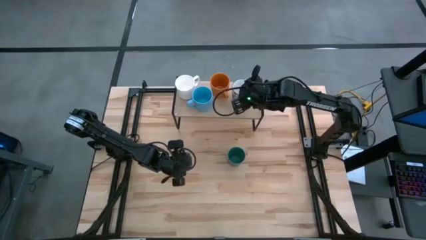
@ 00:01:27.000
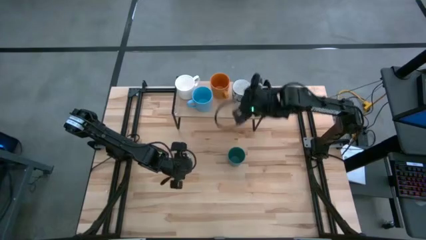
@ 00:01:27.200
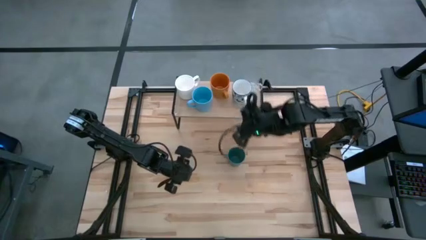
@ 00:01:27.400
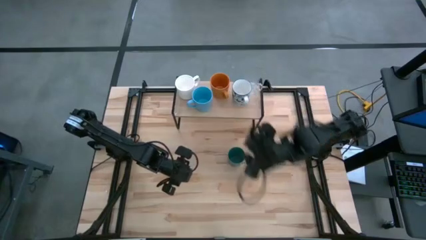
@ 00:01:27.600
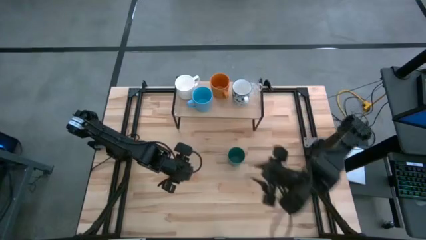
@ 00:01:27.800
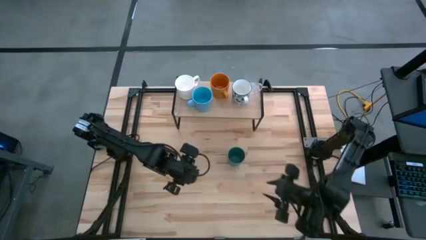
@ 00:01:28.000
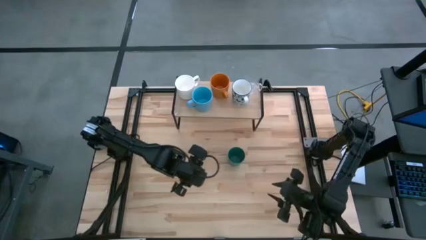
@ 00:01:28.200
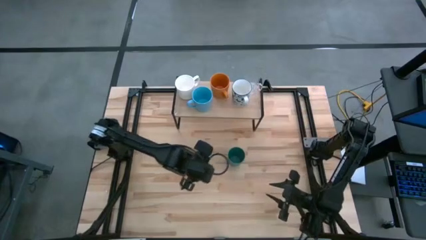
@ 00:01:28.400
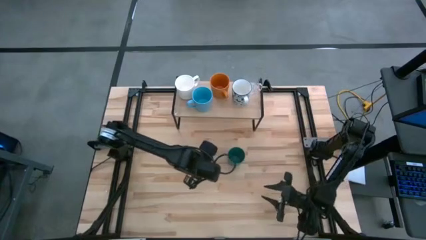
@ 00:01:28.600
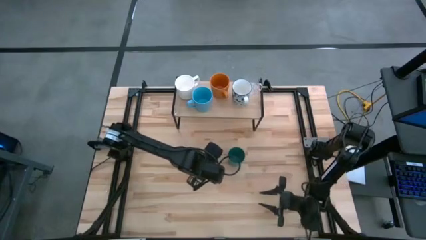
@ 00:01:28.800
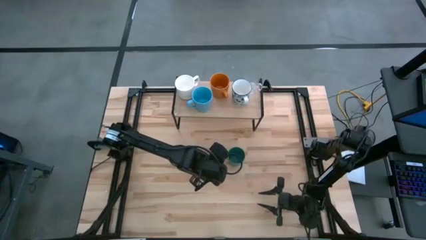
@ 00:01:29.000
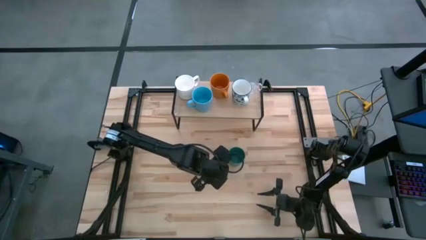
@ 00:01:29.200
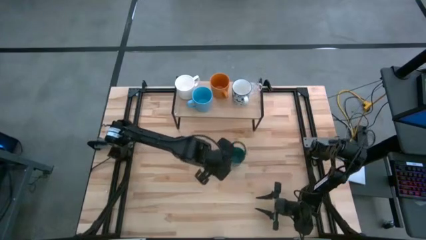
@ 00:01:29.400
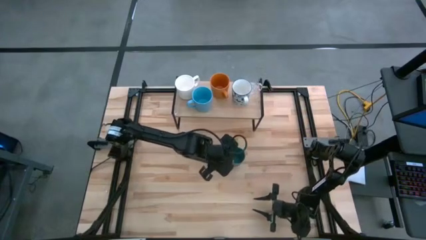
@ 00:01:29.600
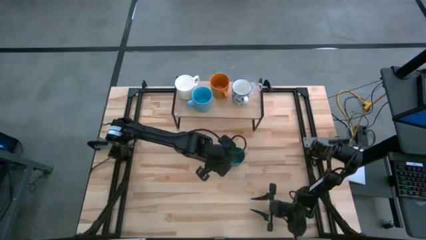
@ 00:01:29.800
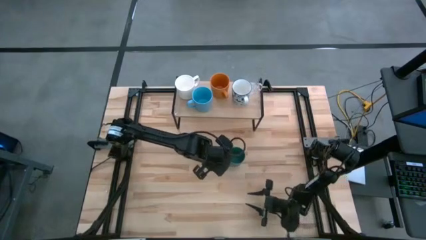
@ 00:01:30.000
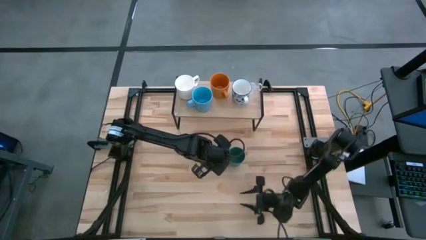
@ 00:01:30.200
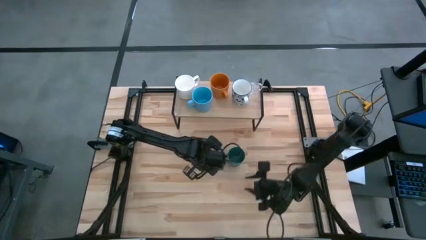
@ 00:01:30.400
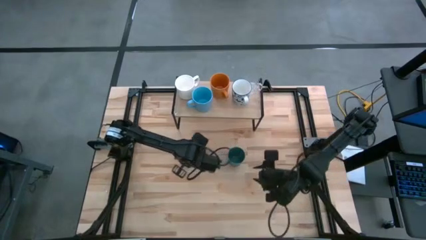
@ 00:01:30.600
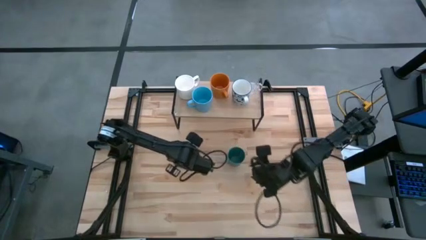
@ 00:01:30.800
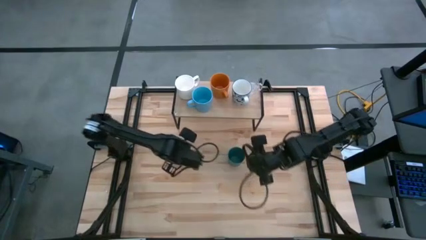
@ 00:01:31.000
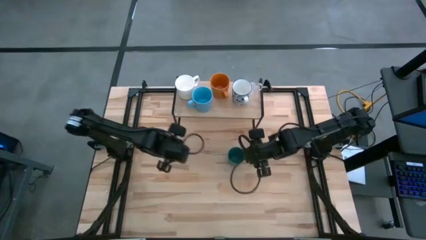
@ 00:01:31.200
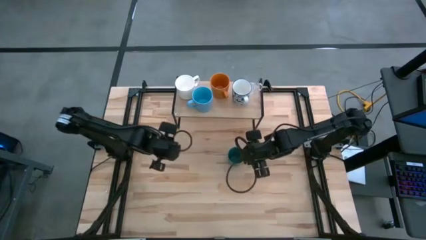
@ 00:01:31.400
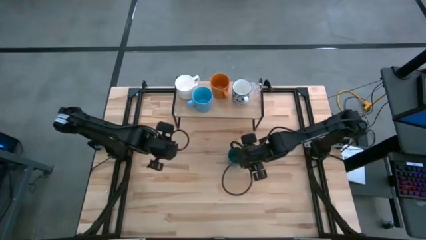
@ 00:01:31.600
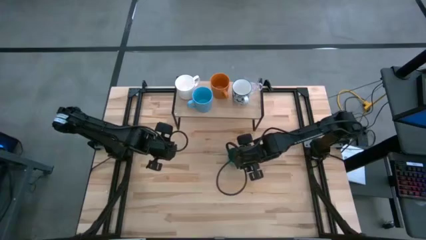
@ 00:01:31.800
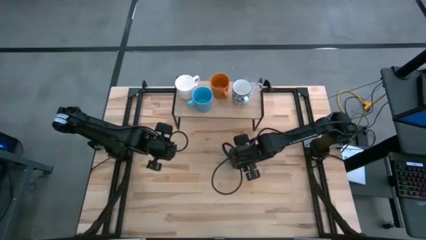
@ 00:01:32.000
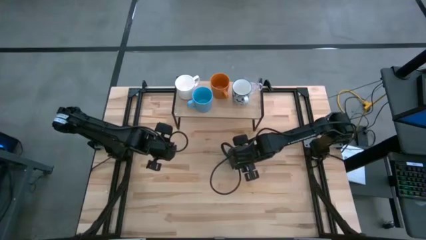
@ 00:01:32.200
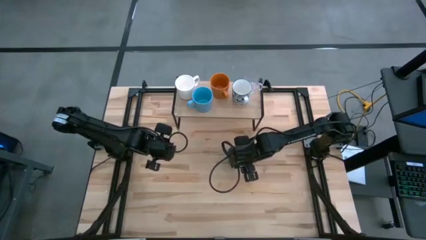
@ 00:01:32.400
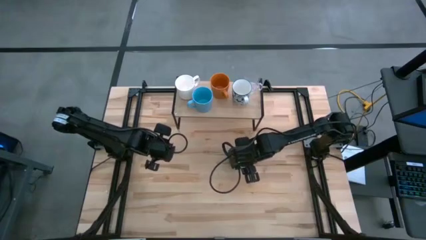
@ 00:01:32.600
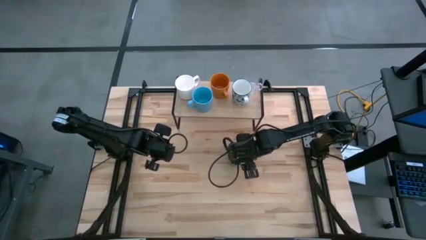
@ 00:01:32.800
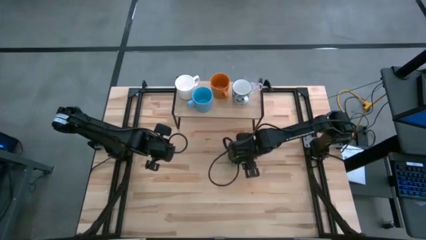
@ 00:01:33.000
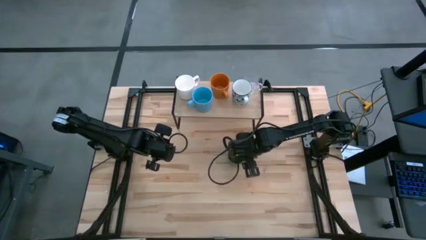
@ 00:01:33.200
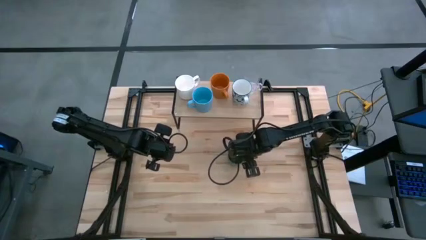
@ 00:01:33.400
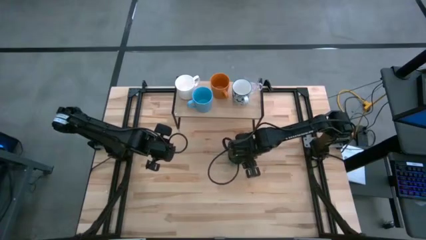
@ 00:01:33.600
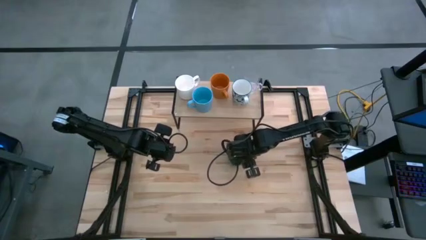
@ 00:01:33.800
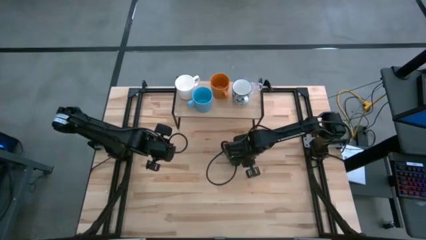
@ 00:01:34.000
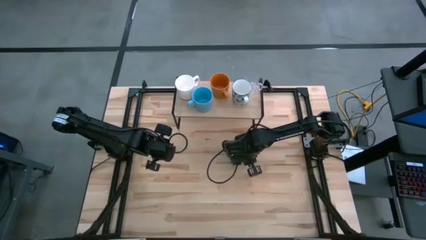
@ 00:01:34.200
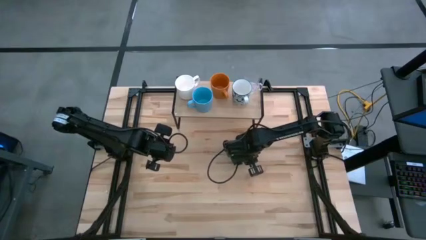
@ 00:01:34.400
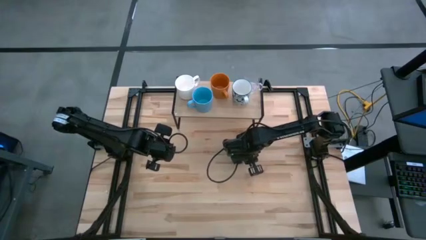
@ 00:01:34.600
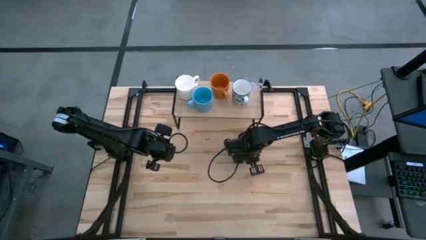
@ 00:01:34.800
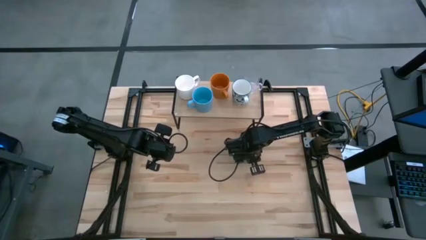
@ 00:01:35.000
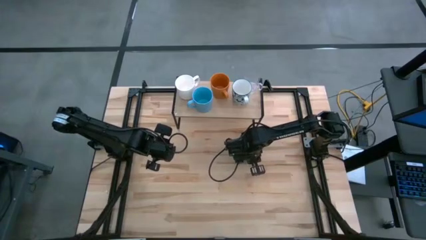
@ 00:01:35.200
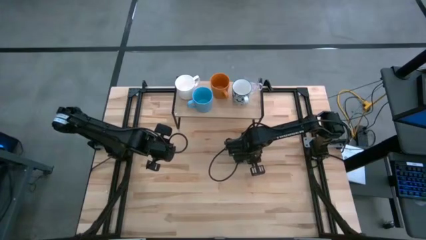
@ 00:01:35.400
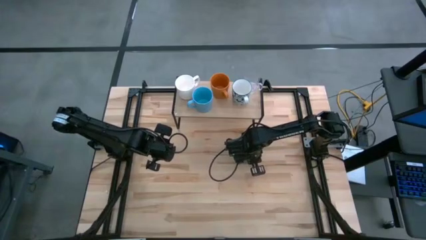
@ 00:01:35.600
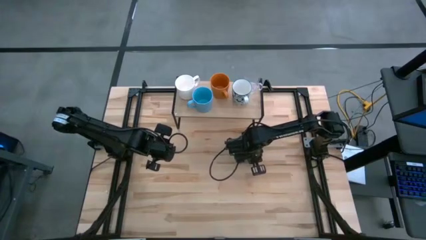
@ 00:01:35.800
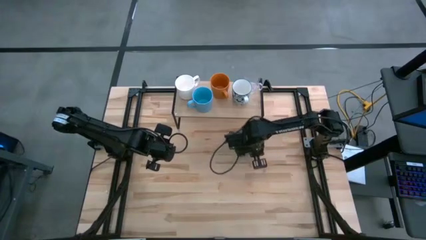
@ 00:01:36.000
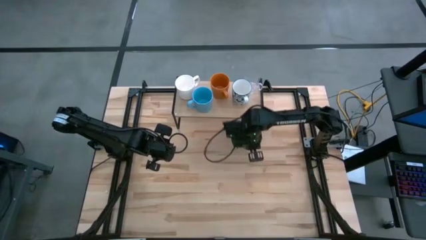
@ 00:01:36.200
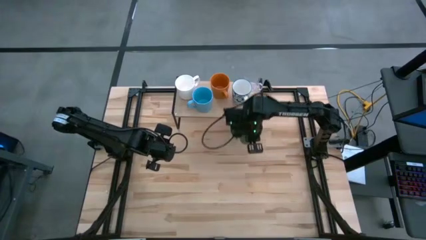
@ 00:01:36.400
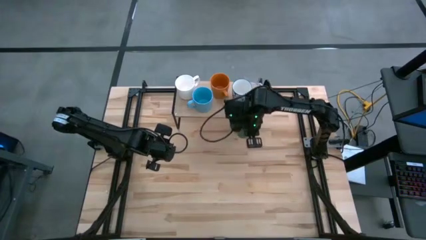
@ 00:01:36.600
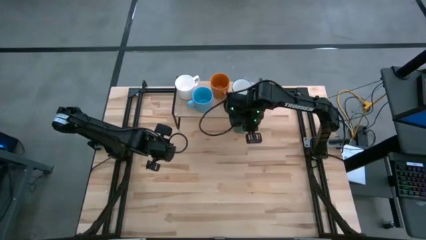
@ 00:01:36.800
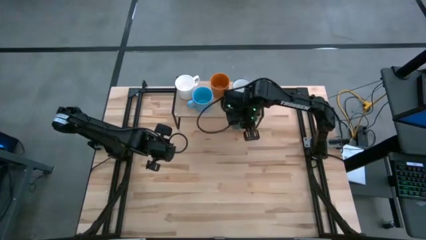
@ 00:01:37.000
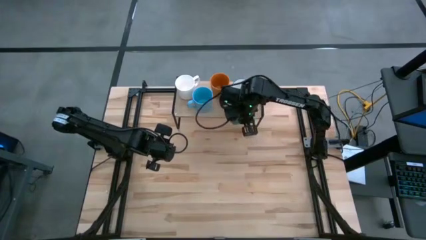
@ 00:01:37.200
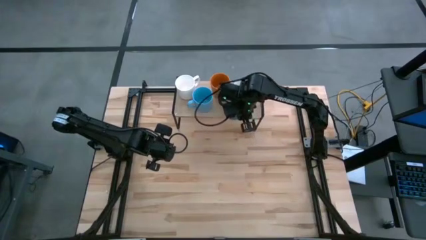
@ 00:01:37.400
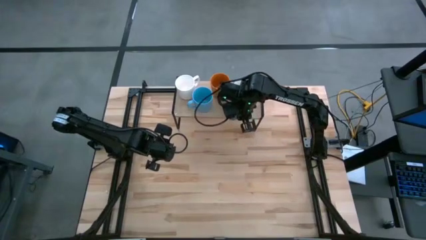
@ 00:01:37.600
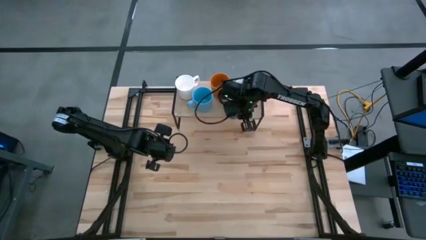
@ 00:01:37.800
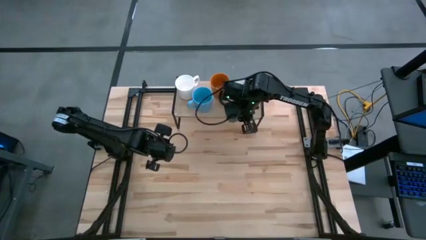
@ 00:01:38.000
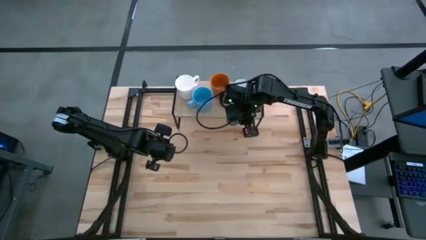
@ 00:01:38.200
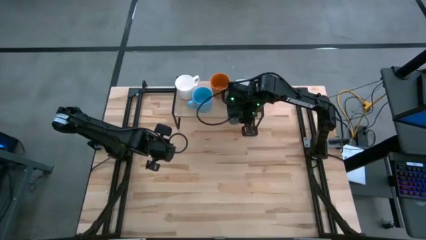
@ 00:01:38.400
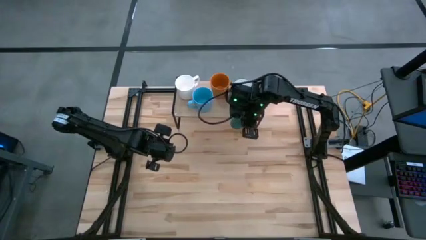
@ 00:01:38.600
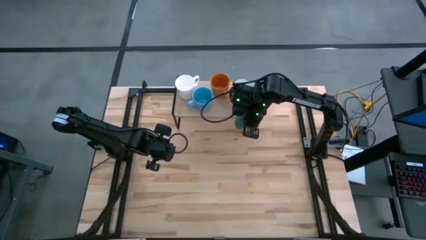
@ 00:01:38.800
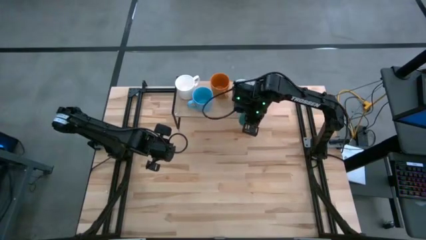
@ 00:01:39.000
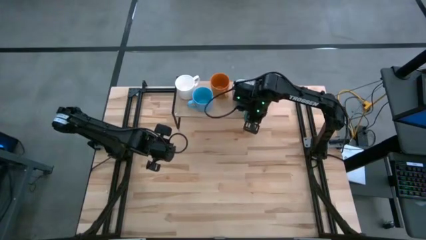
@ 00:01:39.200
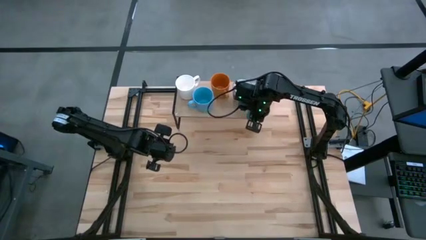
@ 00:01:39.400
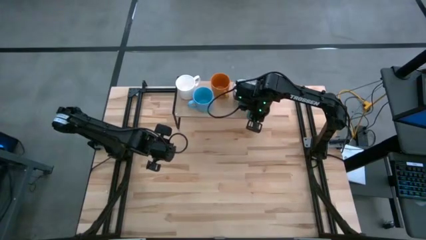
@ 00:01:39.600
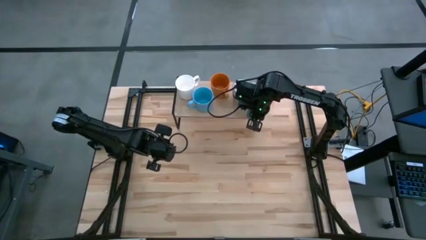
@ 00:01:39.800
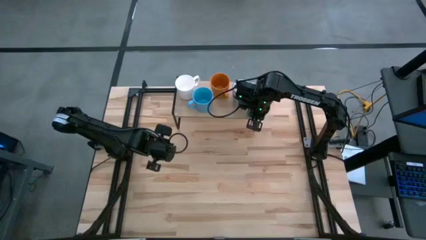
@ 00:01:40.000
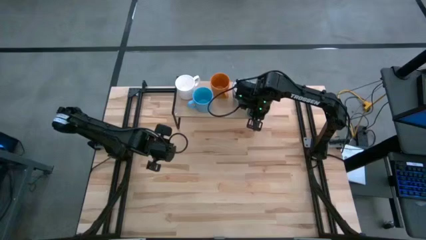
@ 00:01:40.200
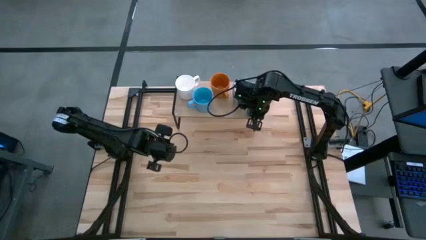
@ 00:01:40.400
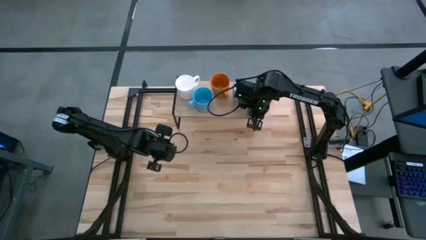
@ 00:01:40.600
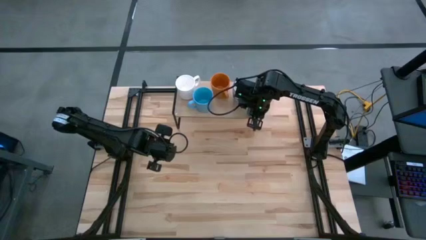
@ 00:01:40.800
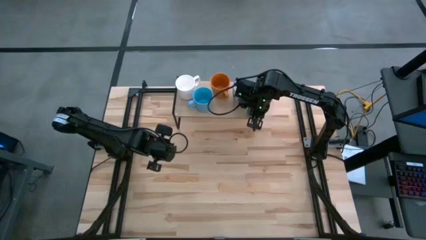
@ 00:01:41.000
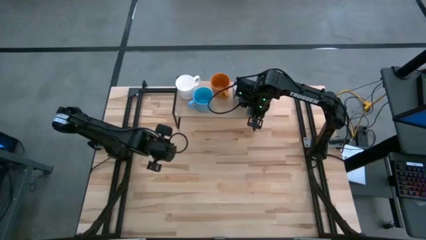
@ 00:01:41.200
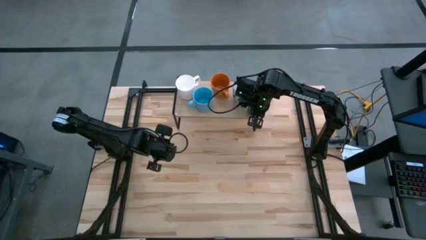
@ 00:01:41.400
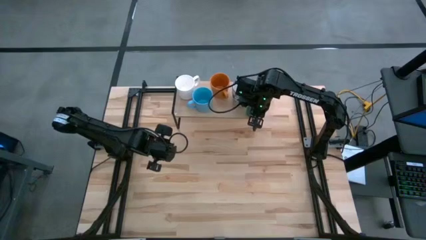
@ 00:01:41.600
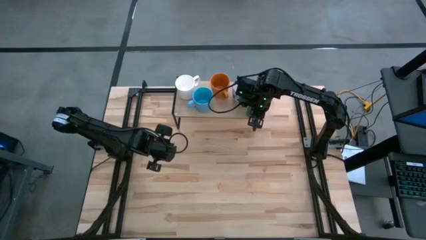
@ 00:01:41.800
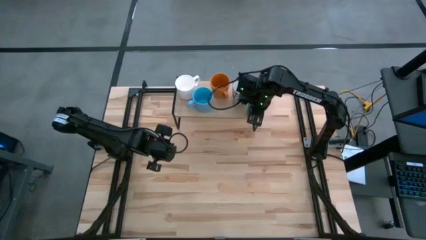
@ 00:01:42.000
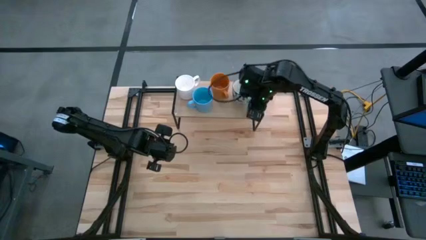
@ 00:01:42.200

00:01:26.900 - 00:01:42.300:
Task: Stack small to large cups/mugs on shelf
Put the dark green cup on the shelf
